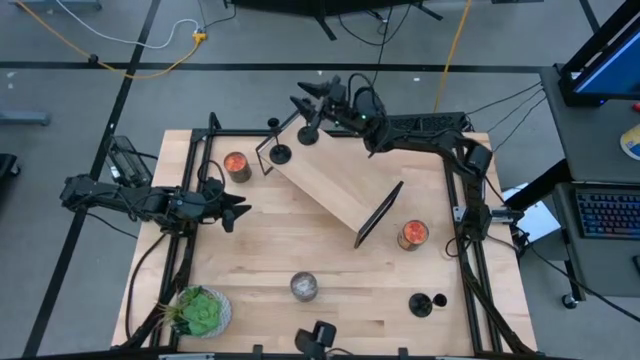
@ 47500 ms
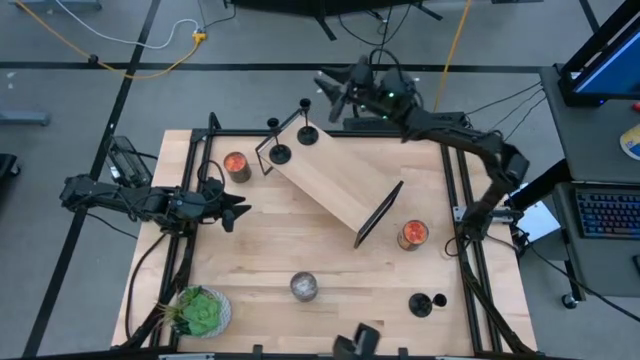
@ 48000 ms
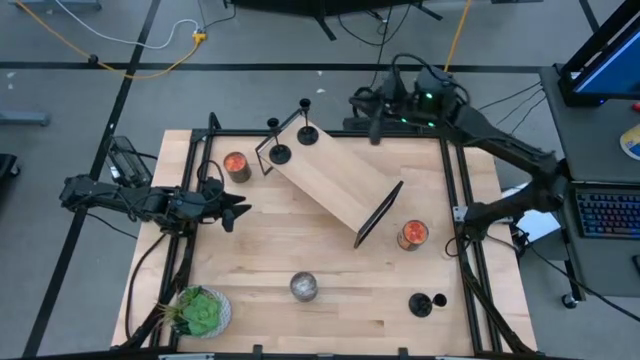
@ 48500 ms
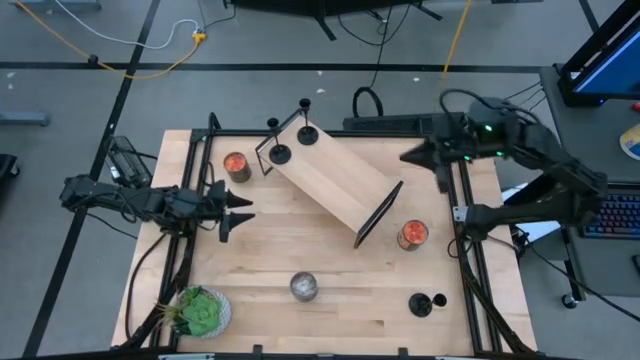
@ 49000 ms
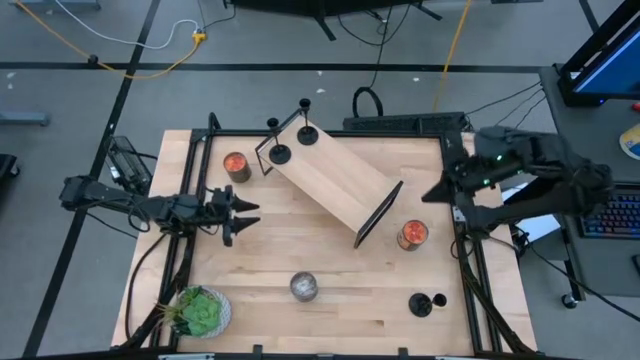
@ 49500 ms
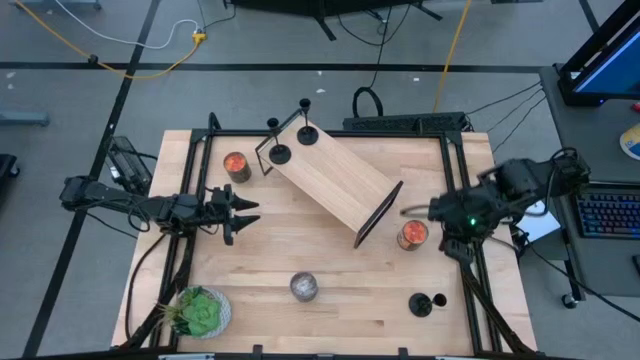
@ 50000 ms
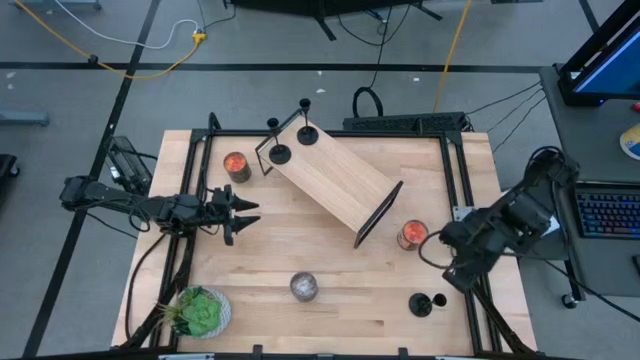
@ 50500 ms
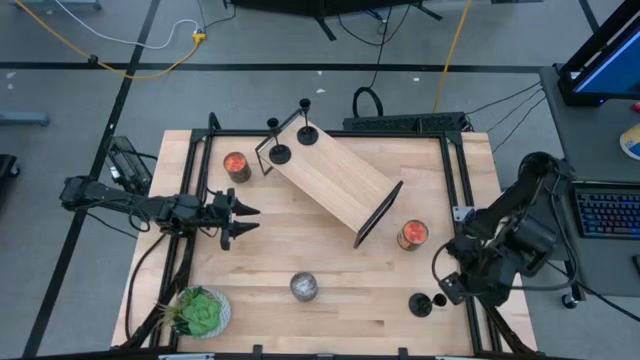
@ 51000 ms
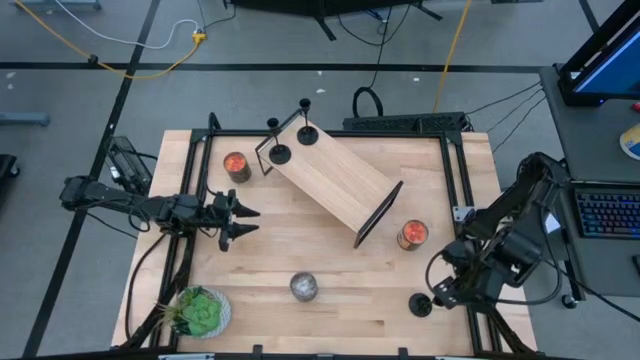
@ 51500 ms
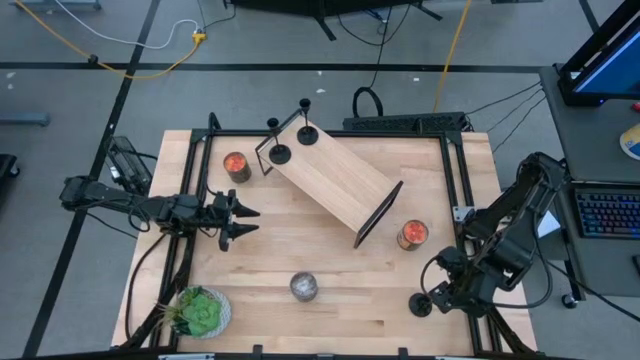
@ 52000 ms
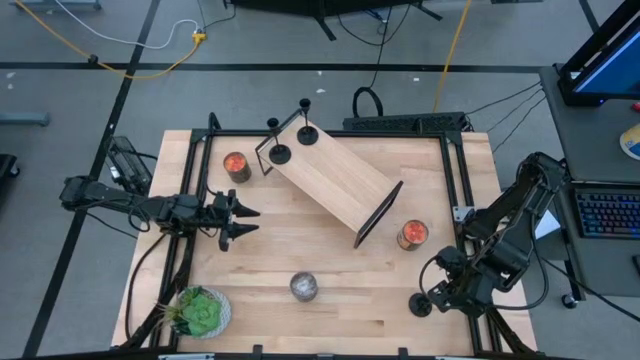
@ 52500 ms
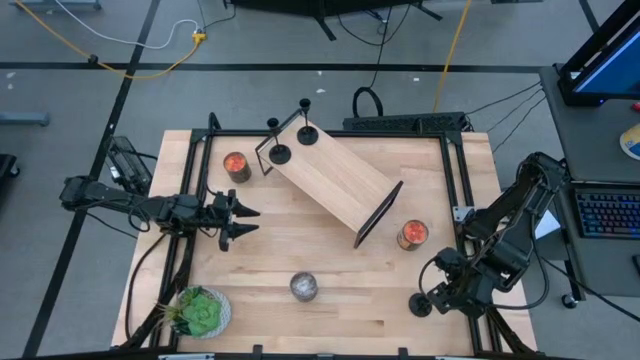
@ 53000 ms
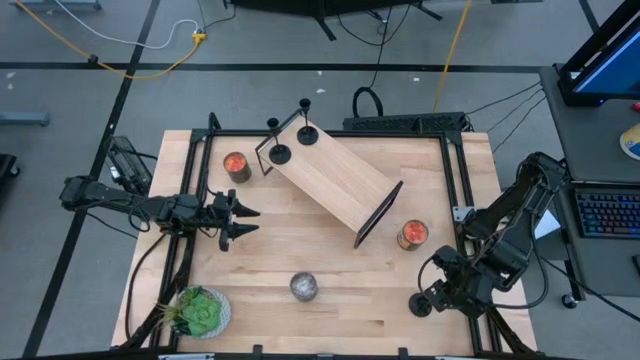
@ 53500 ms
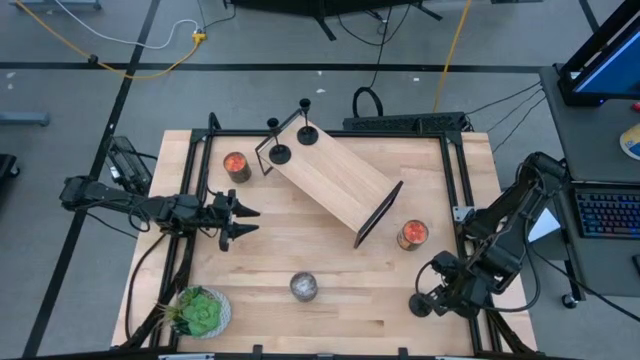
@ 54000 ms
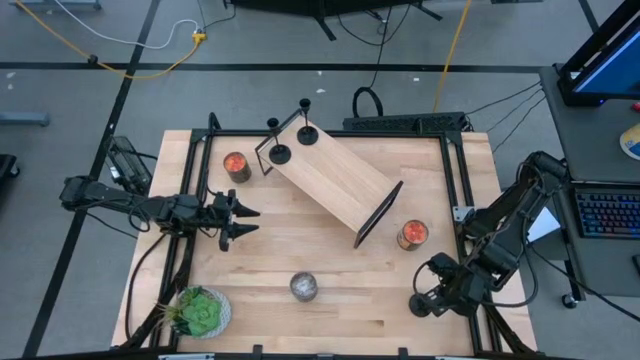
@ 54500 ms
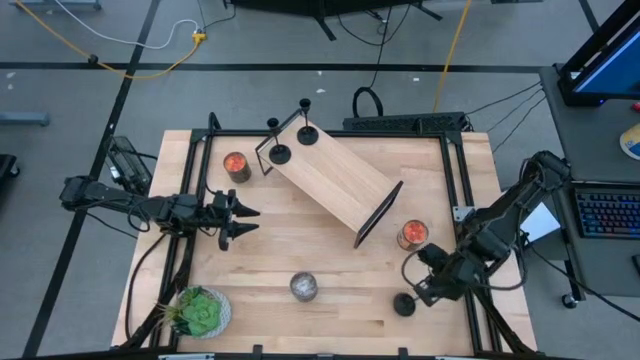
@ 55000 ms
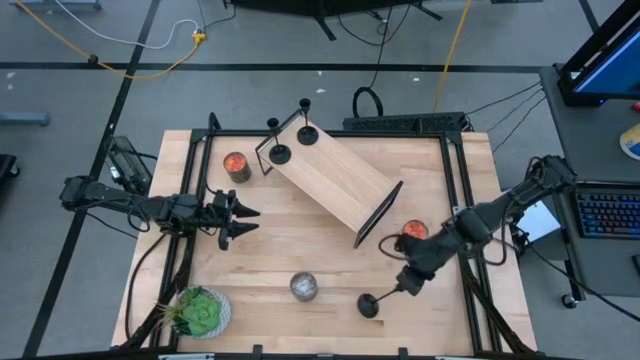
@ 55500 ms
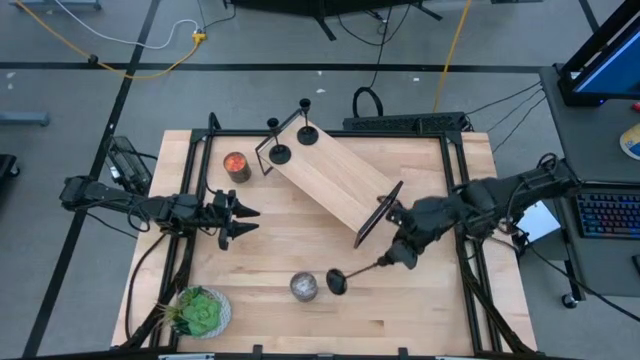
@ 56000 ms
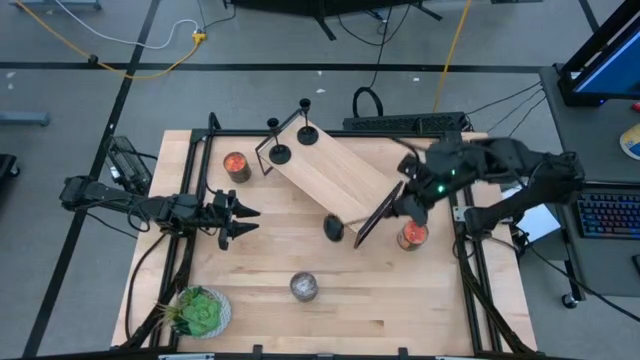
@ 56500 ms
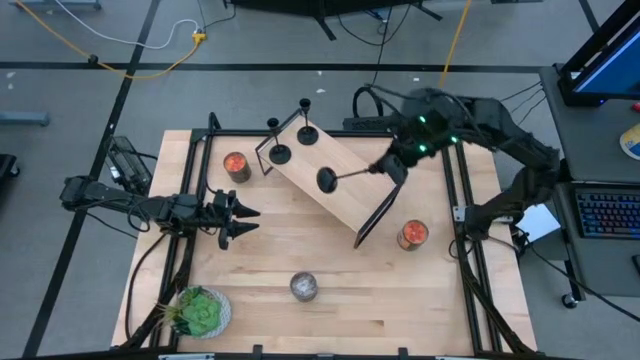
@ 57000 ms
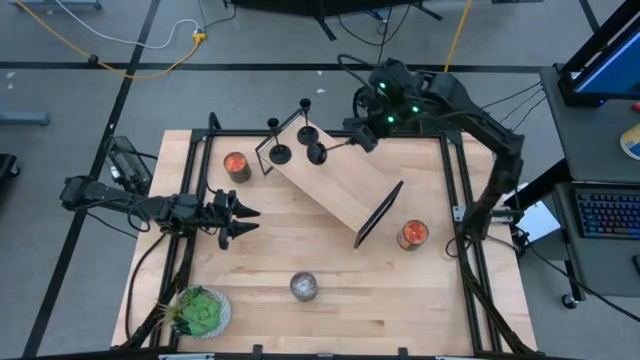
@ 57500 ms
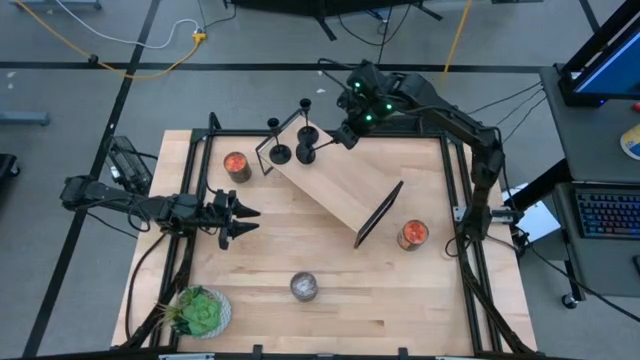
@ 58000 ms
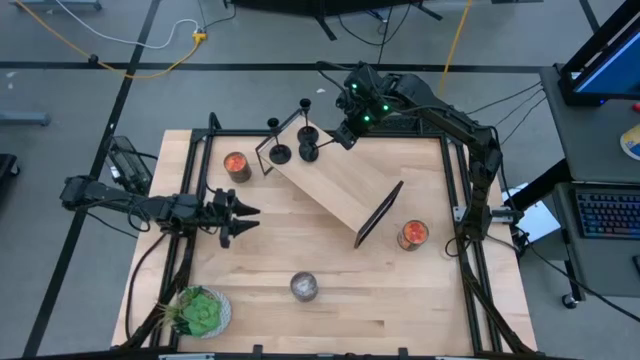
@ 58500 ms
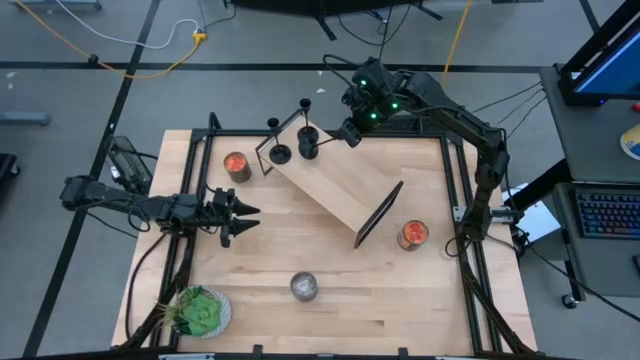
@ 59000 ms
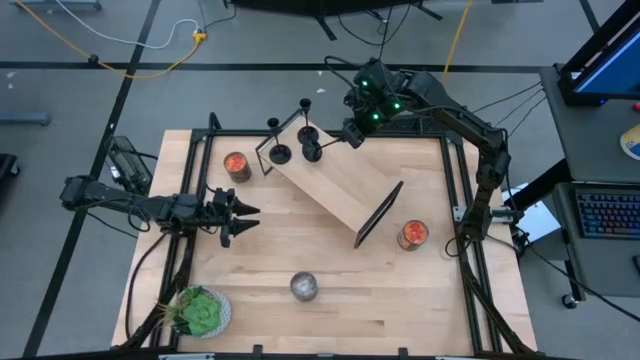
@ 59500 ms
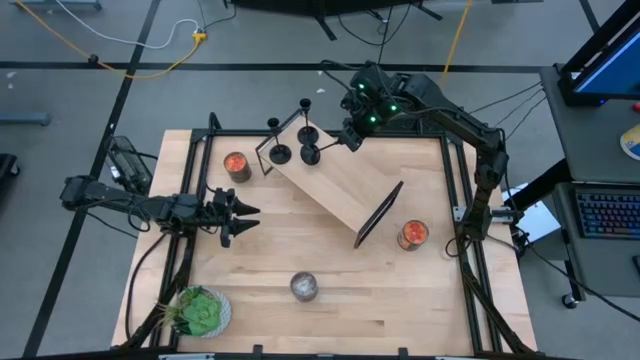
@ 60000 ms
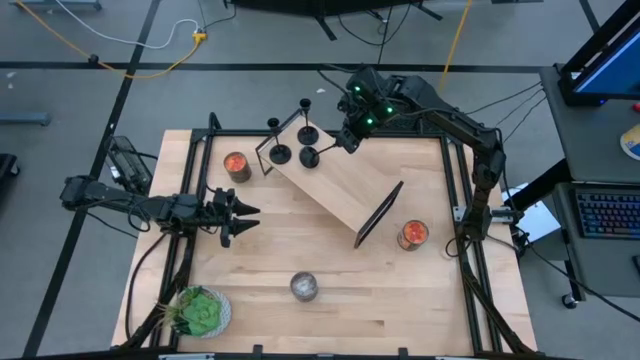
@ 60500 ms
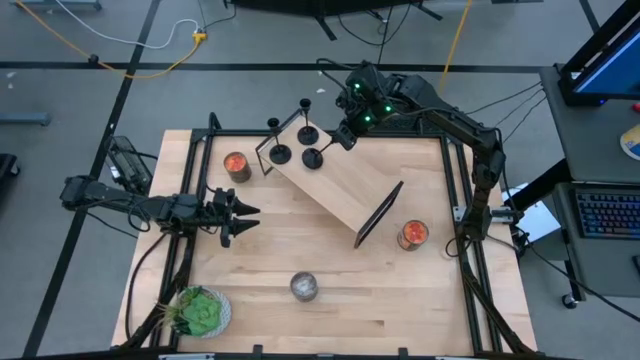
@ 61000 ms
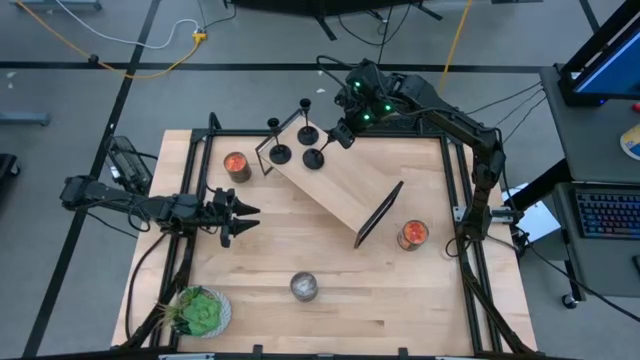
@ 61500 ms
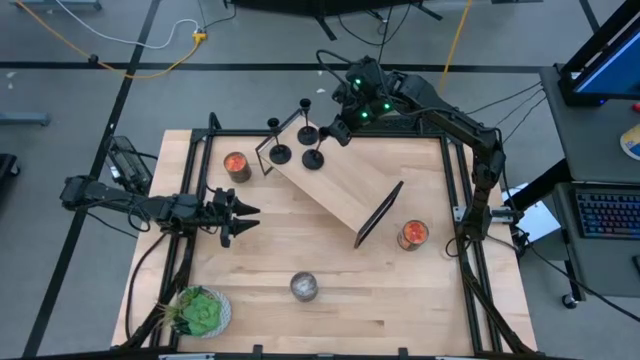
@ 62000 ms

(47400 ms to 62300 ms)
Task: Pick & Place candle stick holders
Put the black candle holder on the shelf

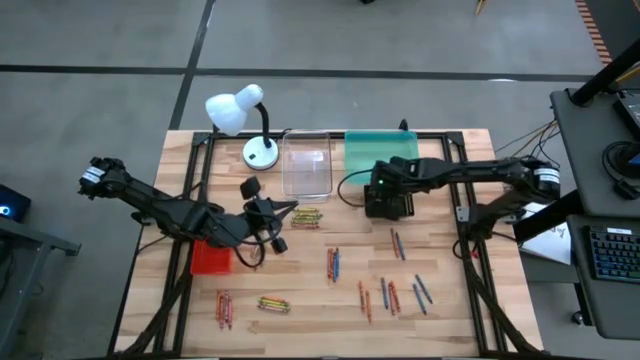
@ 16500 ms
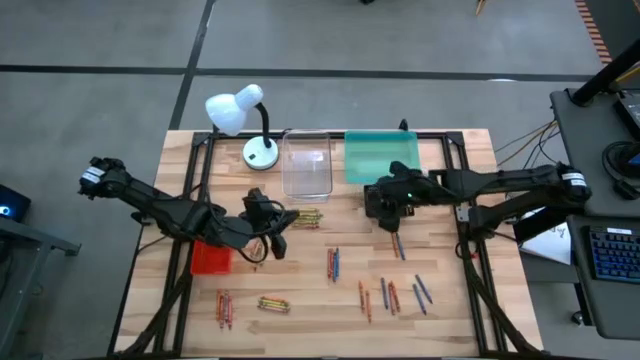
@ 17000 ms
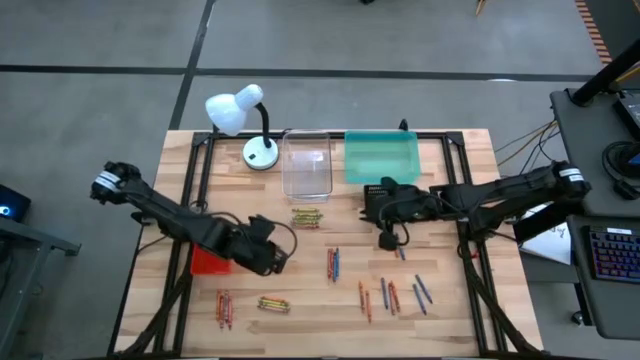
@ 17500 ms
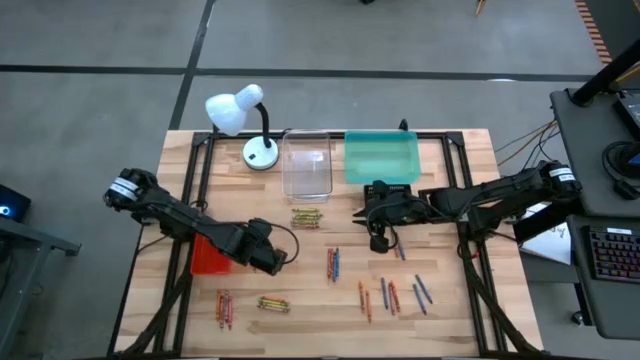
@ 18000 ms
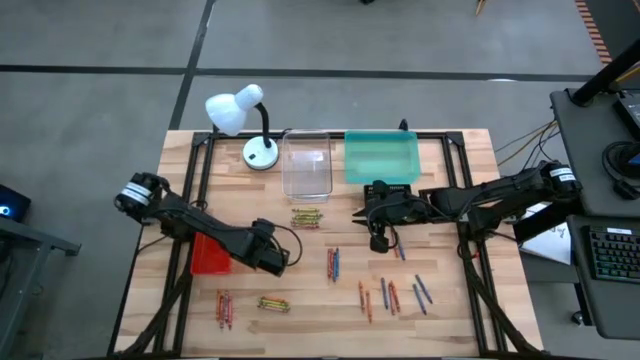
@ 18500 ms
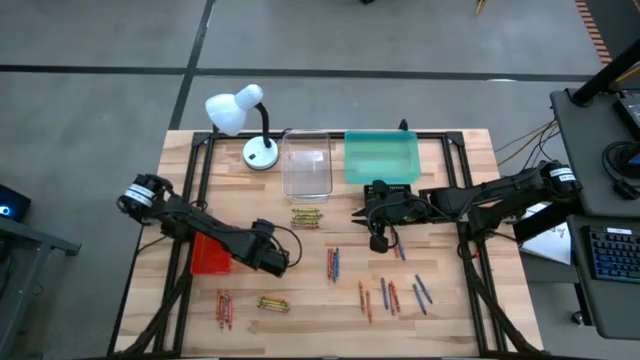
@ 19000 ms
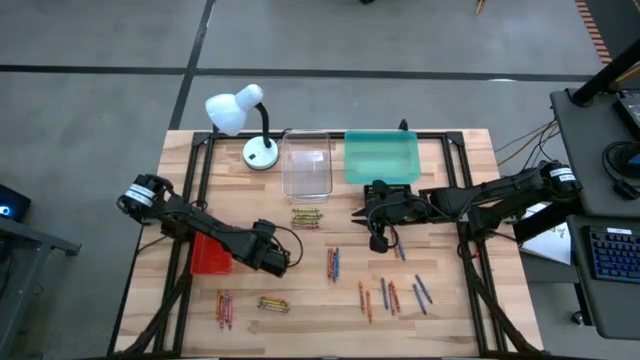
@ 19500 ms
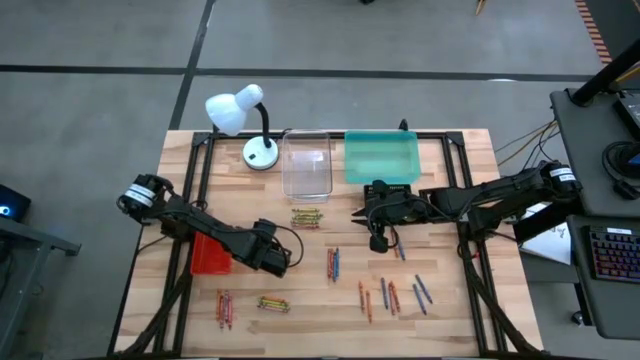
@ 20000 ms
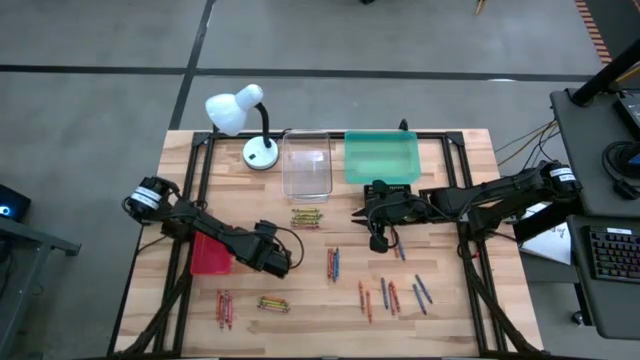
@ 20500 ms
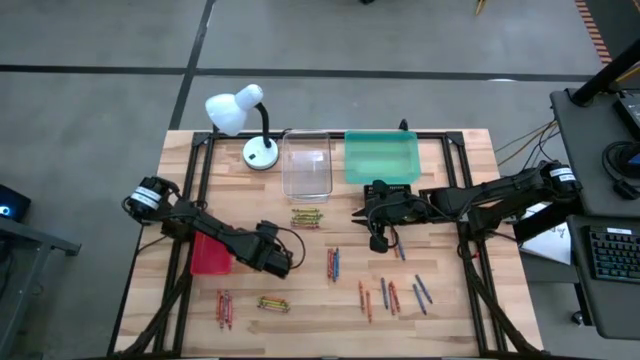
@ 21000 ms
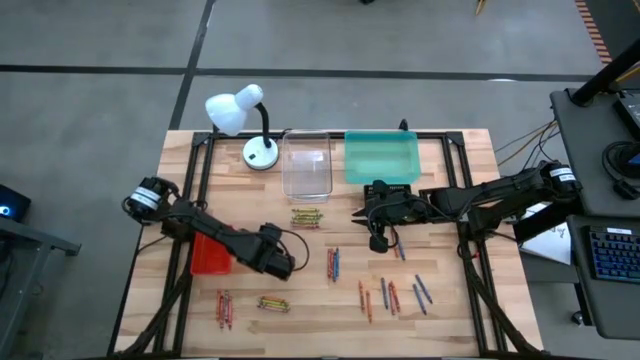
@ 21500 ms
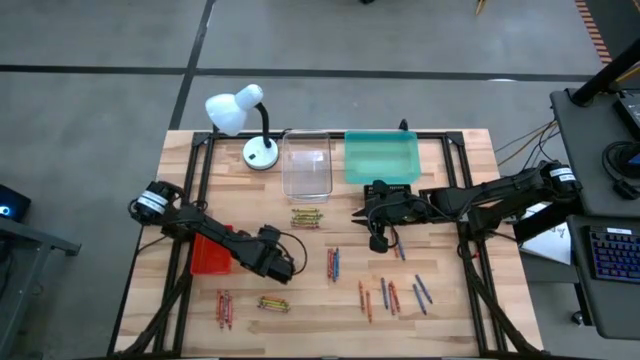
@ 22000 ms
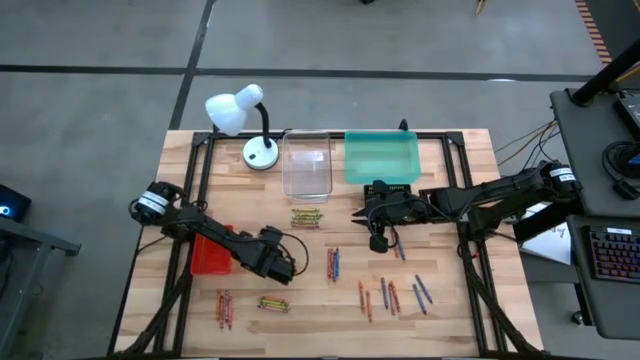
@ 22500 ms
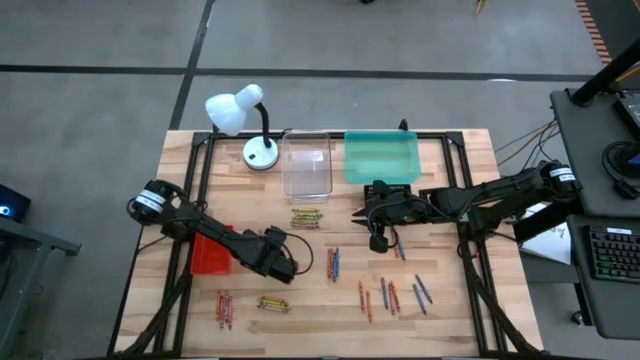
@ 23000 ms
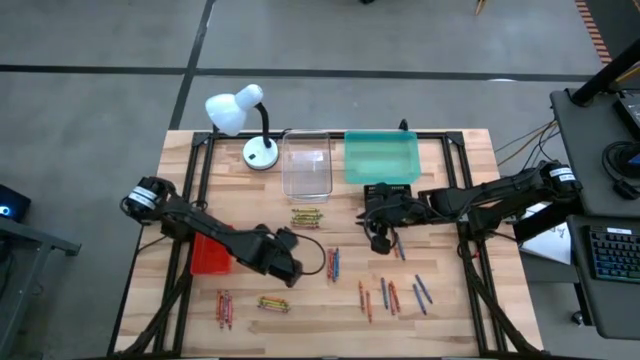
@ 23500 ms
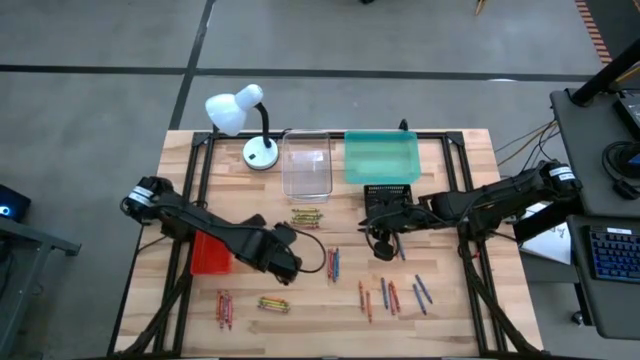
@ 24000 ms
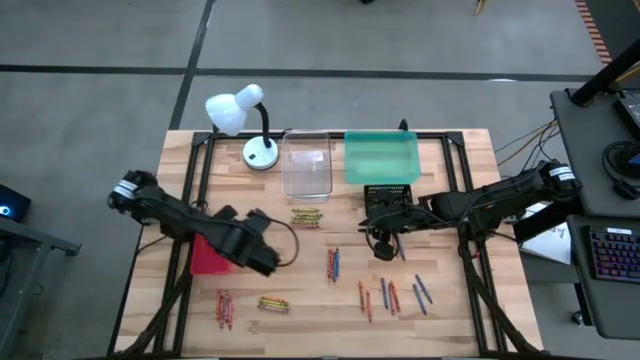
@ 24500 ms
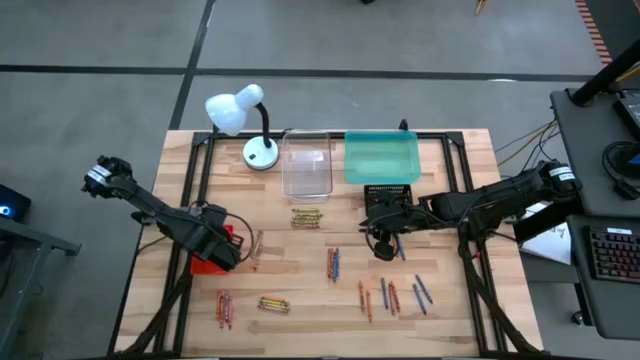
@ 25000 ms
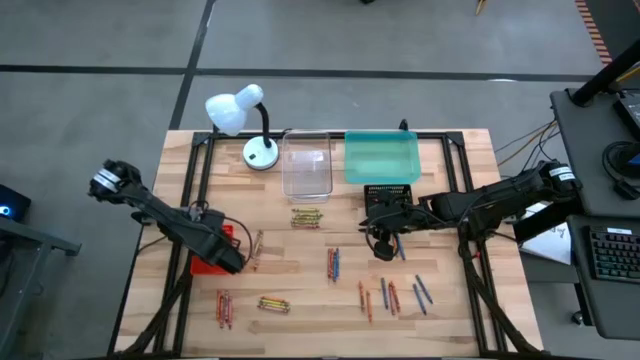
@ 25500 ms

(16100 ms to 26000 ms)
Task: Sort crayons
Put the green crayon into the orange bin
